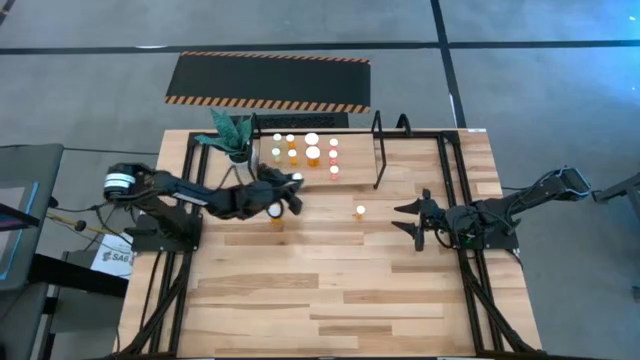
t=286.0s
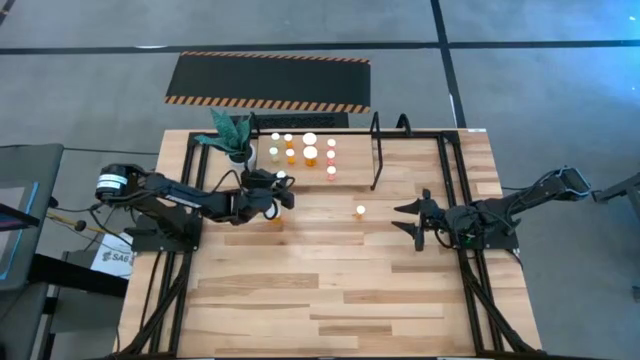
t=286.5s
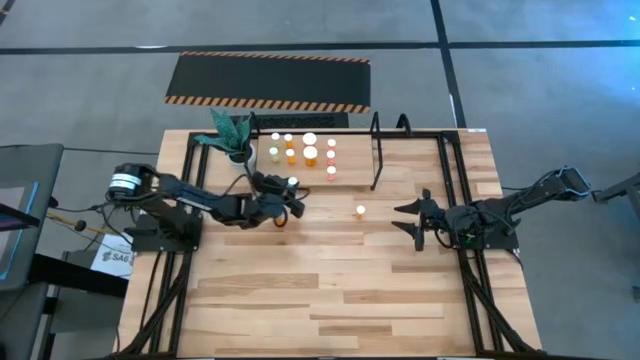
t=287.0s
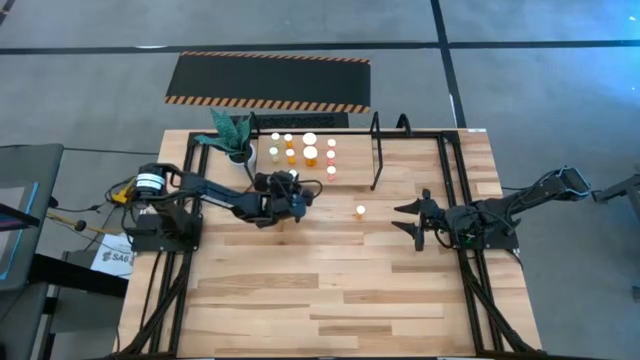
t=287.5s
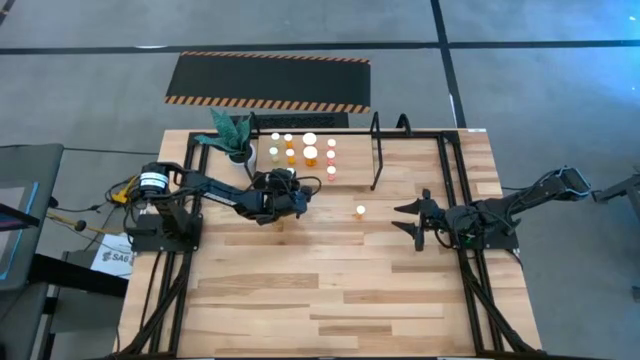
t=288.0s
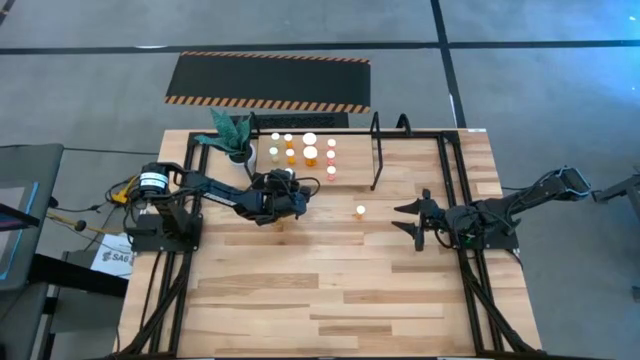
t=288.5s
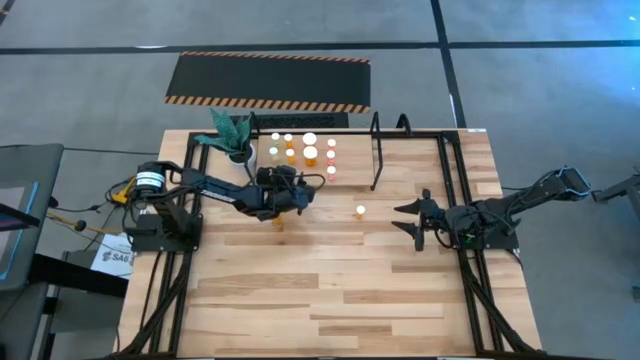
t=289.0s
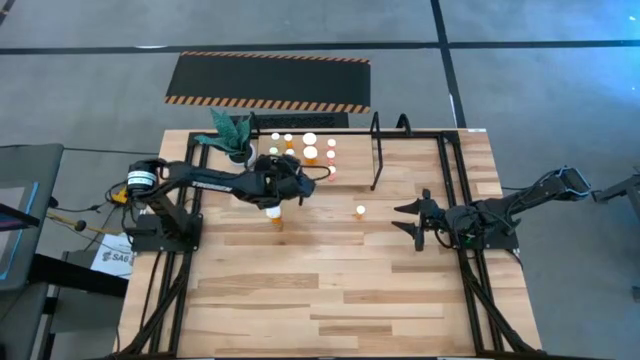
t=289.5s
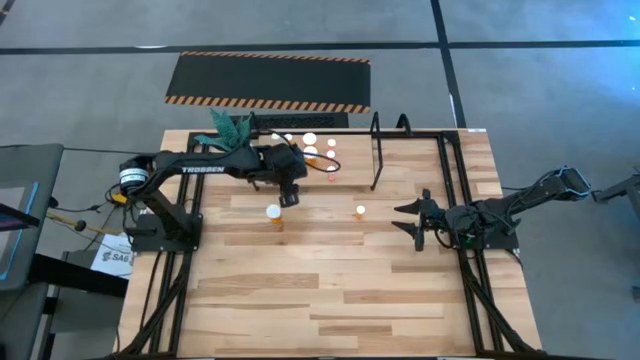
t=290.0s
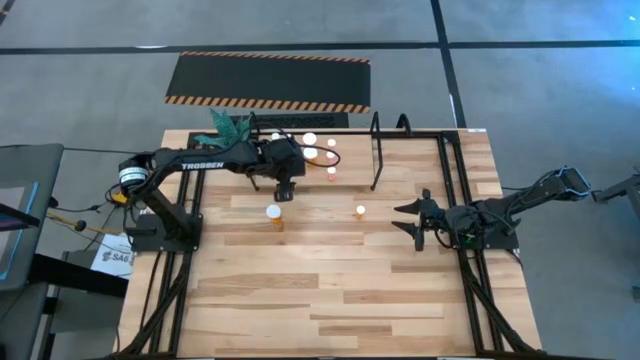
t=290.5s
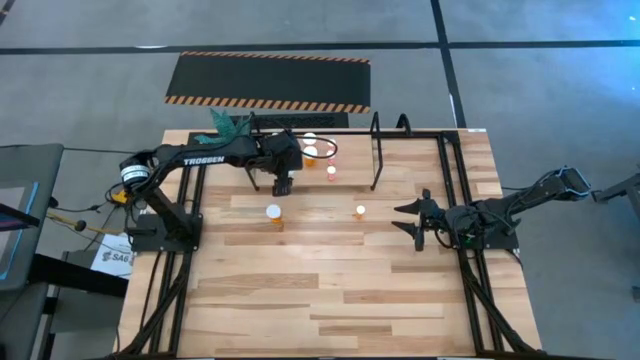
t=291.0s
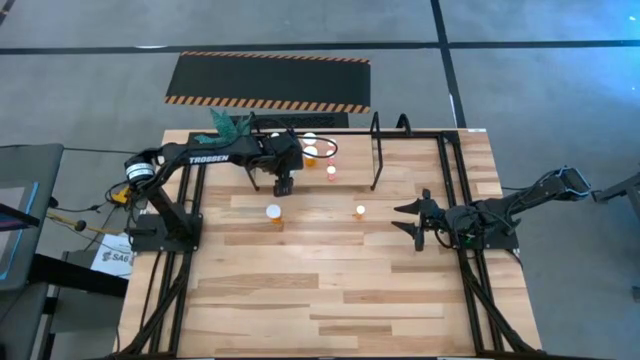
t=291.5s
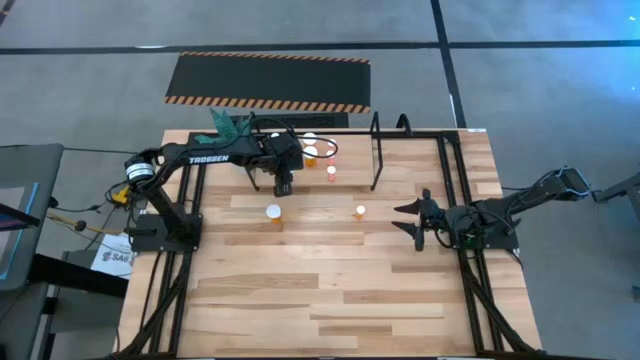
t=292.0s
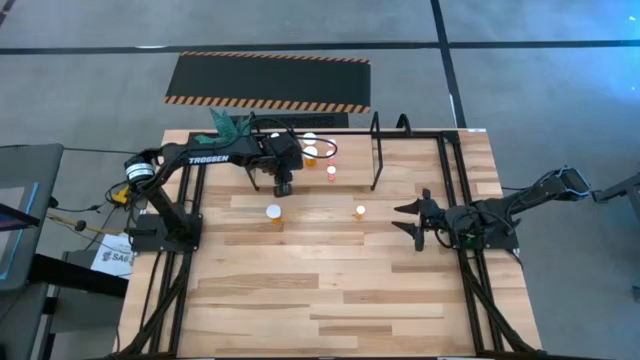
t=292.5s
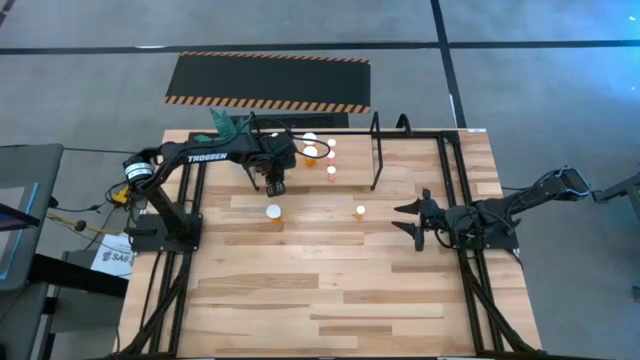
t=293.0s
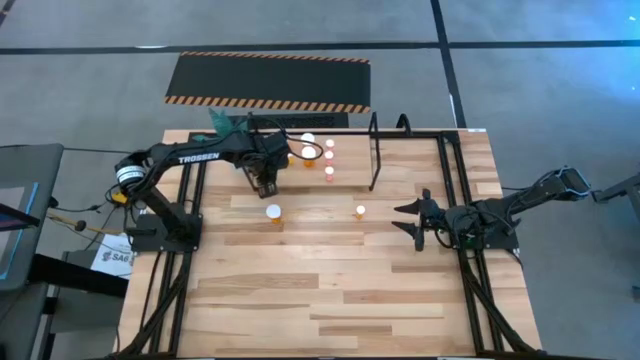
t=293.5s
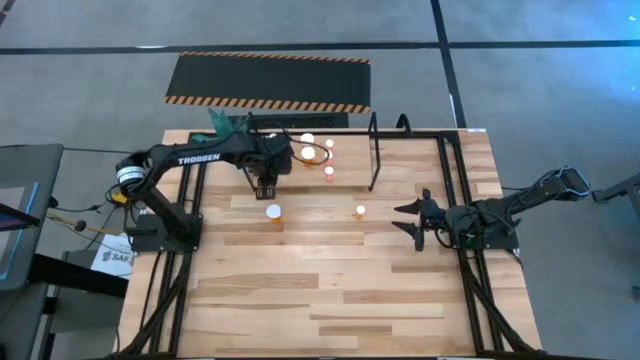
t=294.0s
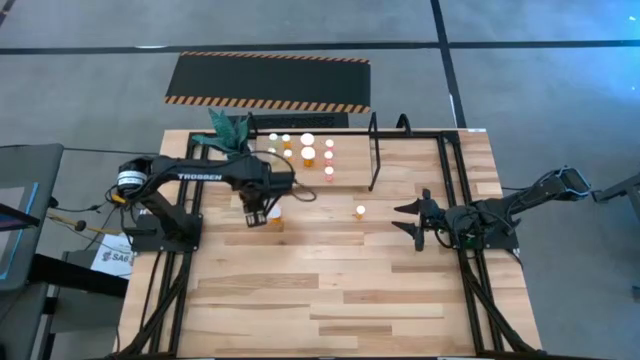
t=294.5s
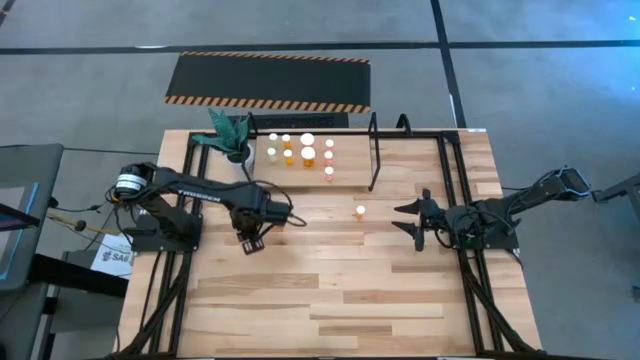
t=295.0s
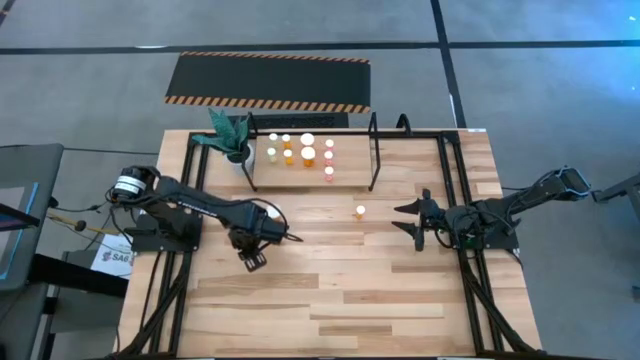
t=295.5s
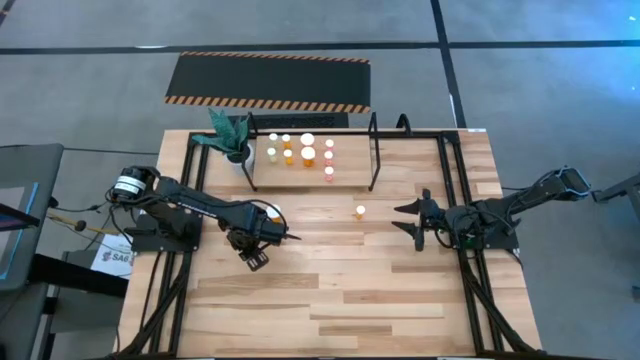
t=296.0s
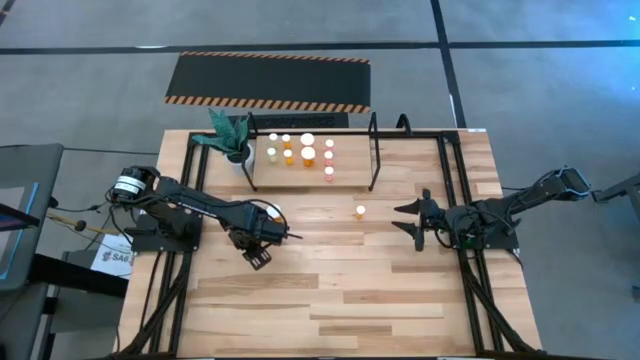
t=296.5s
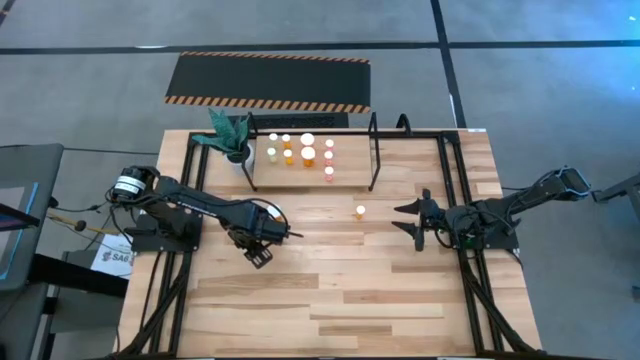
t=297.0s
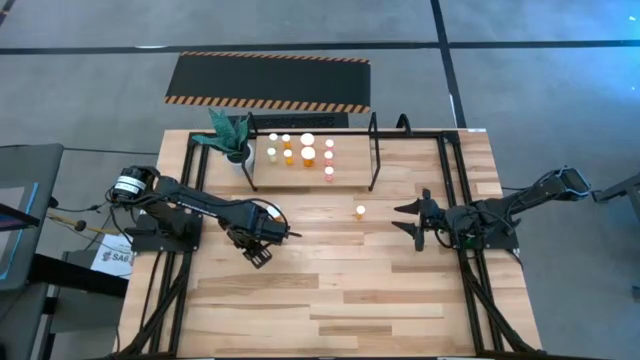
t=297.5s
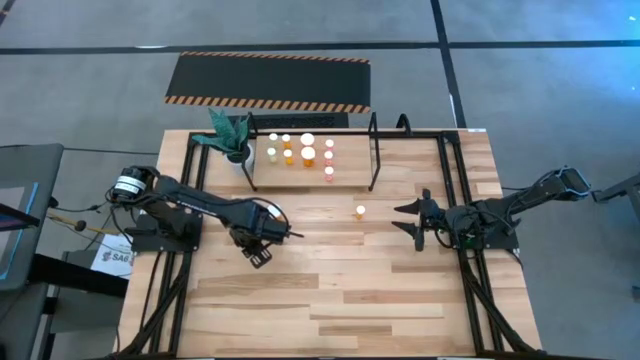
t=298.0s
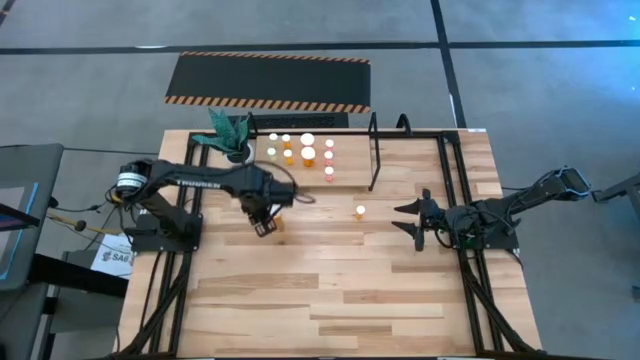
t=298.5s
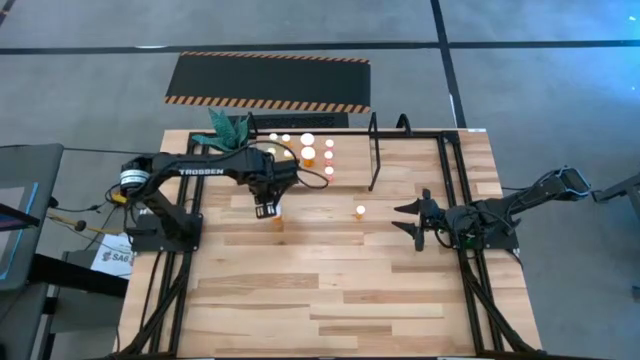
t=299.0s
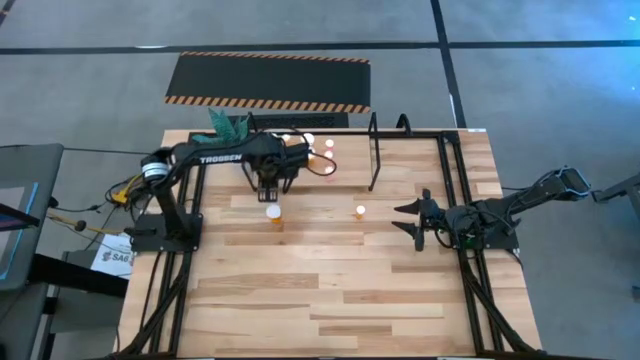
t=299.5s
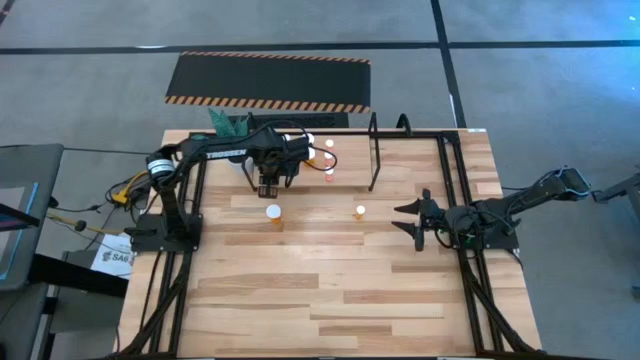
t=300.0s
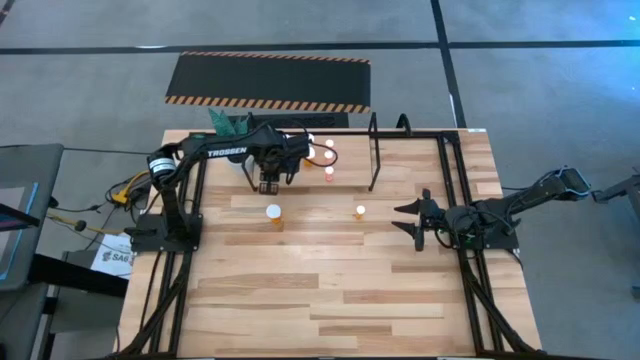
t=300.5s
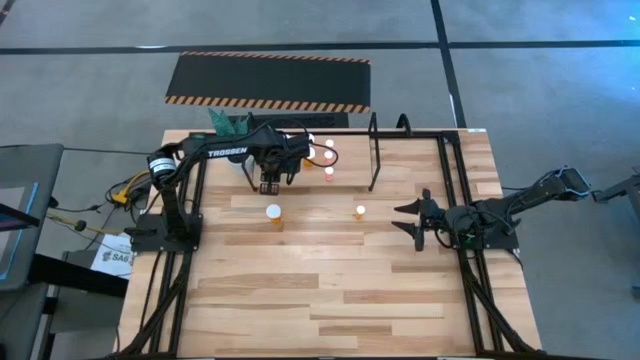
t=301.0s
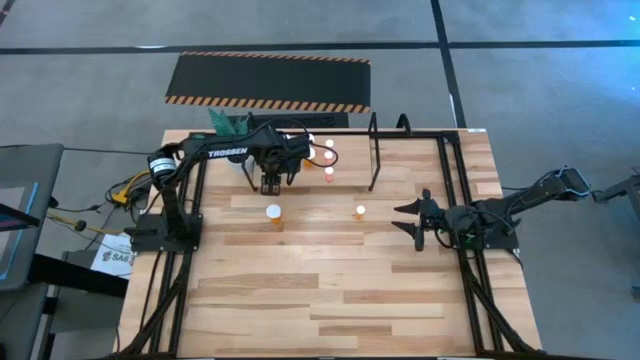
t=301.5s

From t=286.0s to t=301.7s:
Task: Pick and place medicine bottles onto shelf by color
Put the yellow pill bottle on the shelf aligned with the other yellow pill bottle
